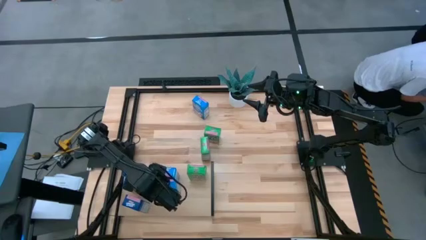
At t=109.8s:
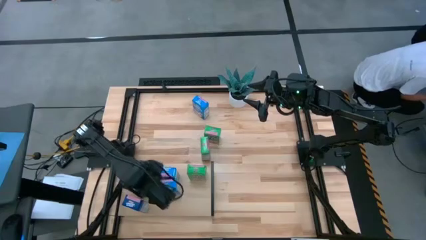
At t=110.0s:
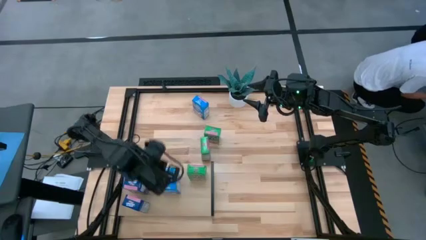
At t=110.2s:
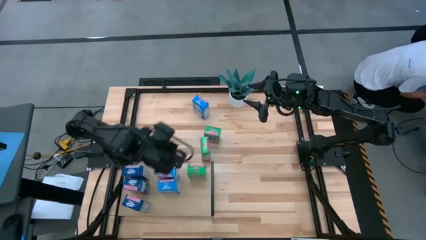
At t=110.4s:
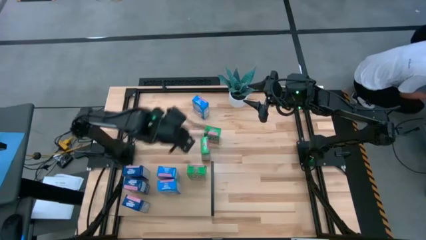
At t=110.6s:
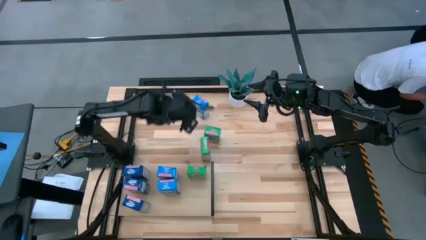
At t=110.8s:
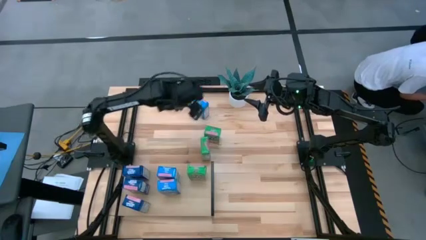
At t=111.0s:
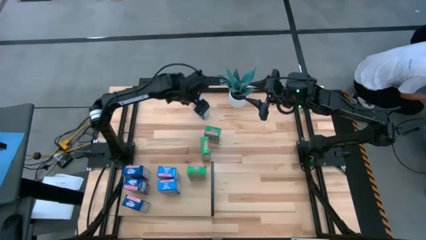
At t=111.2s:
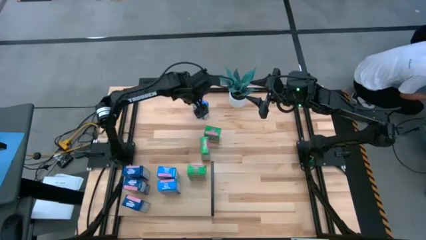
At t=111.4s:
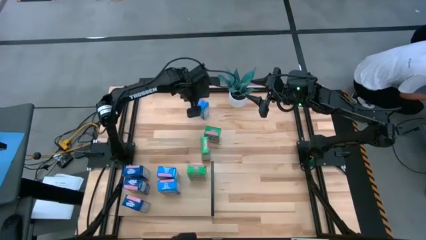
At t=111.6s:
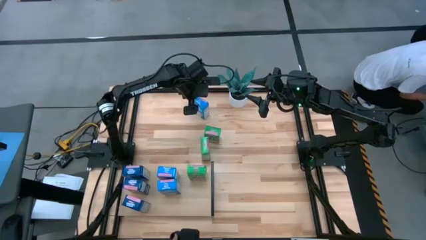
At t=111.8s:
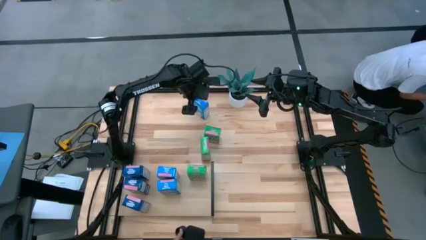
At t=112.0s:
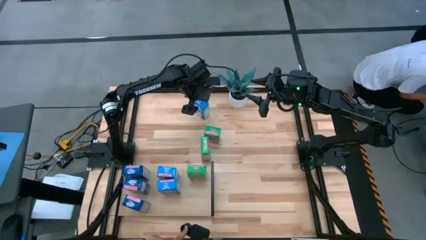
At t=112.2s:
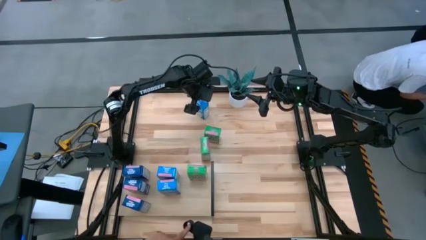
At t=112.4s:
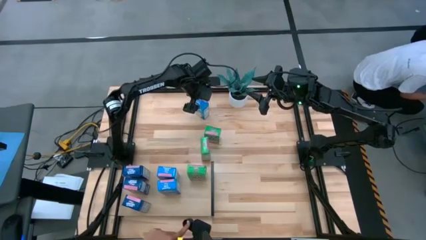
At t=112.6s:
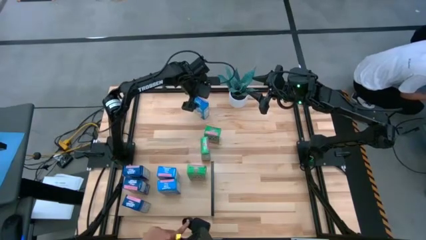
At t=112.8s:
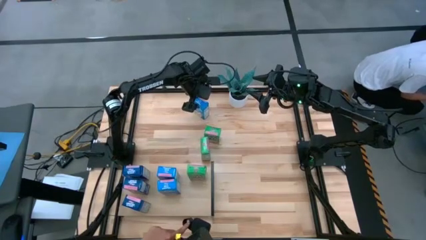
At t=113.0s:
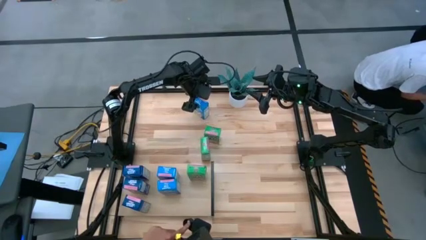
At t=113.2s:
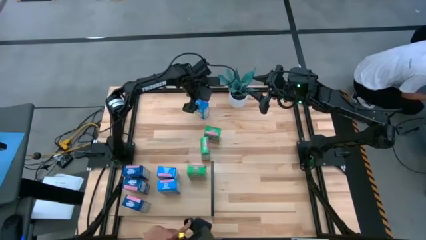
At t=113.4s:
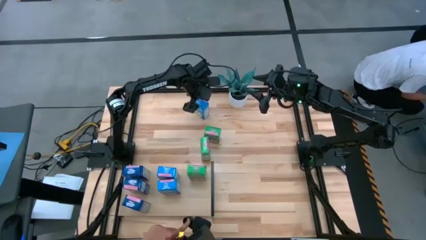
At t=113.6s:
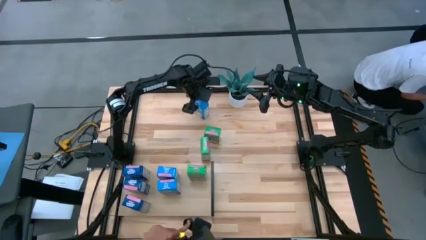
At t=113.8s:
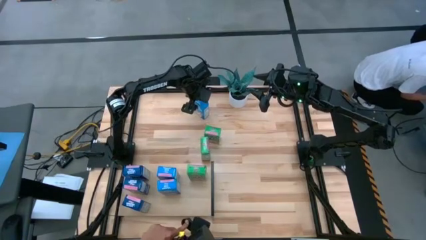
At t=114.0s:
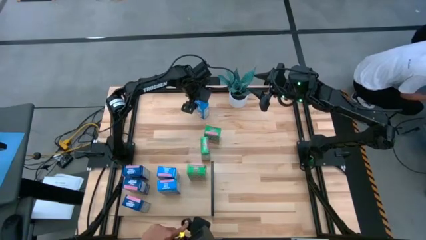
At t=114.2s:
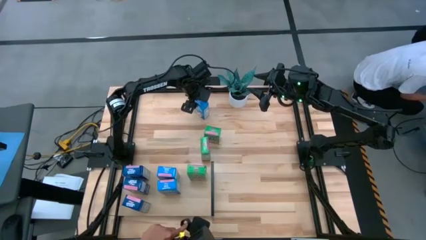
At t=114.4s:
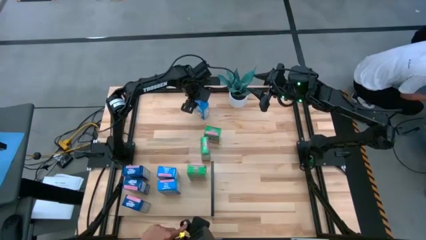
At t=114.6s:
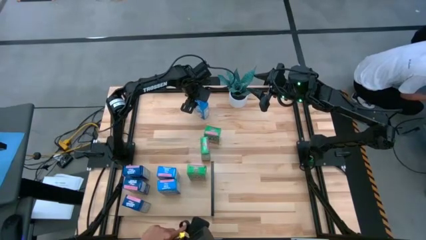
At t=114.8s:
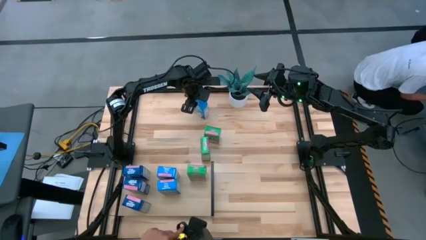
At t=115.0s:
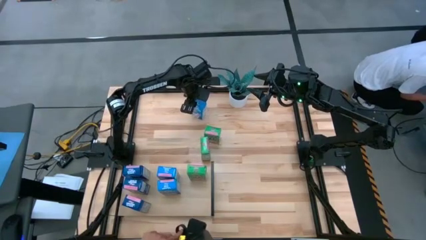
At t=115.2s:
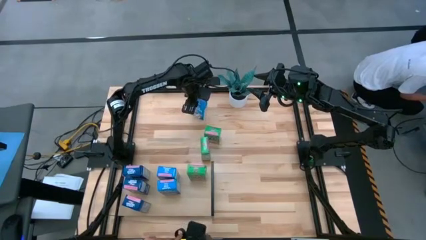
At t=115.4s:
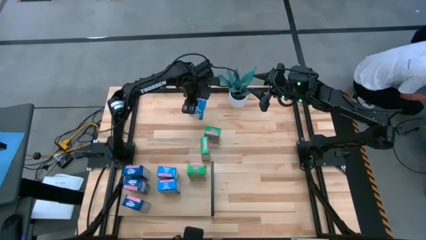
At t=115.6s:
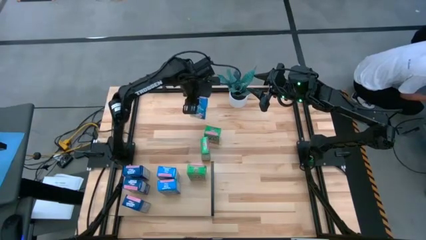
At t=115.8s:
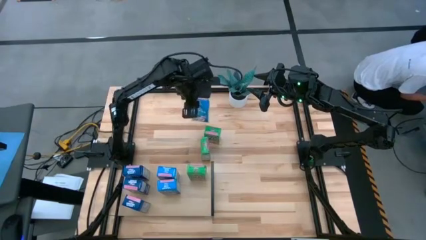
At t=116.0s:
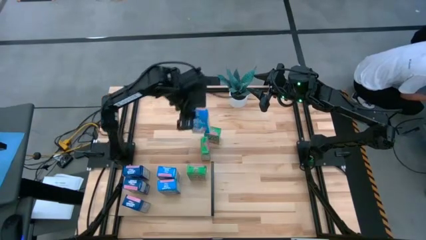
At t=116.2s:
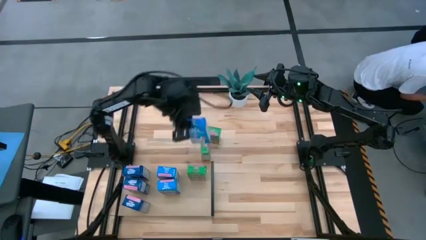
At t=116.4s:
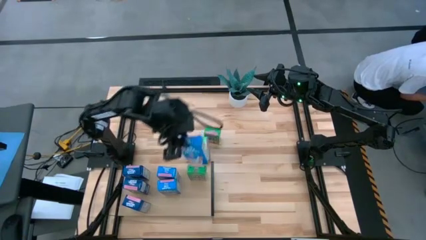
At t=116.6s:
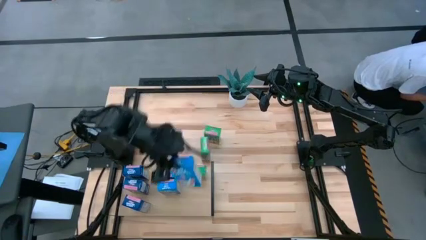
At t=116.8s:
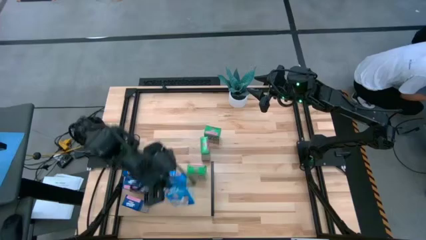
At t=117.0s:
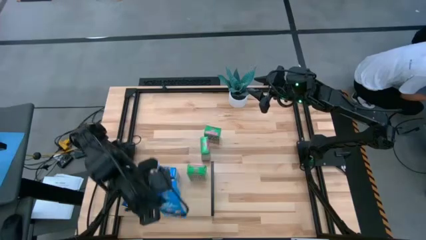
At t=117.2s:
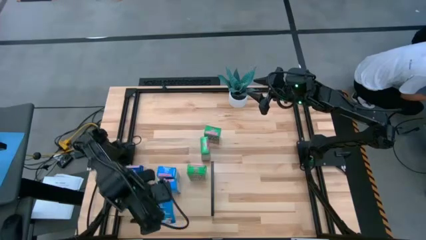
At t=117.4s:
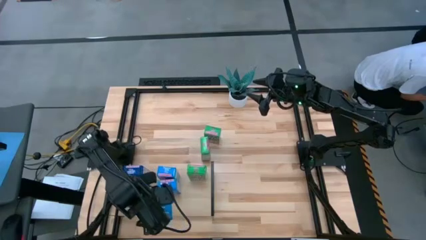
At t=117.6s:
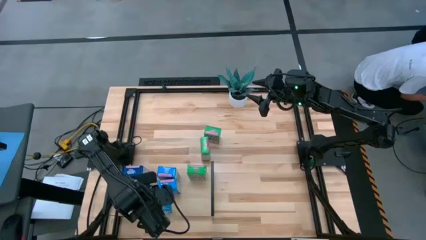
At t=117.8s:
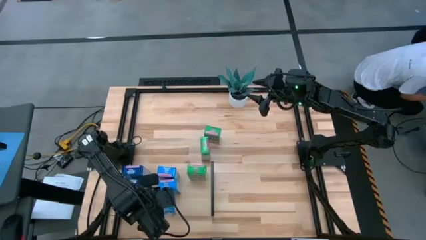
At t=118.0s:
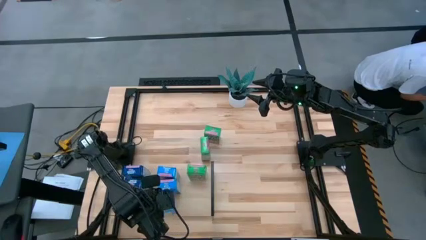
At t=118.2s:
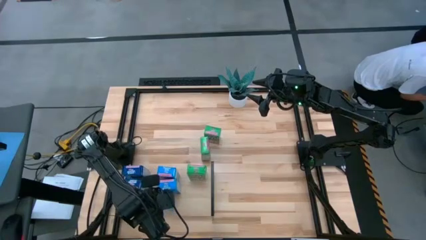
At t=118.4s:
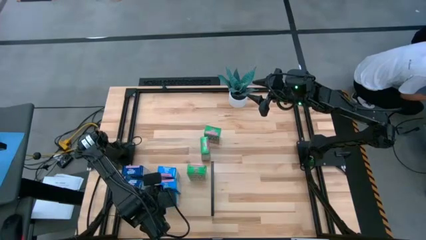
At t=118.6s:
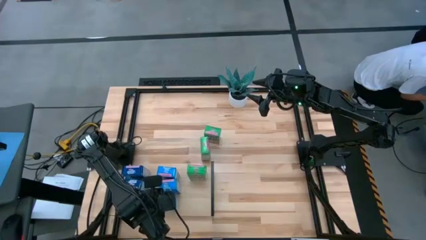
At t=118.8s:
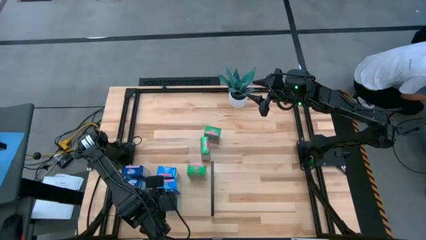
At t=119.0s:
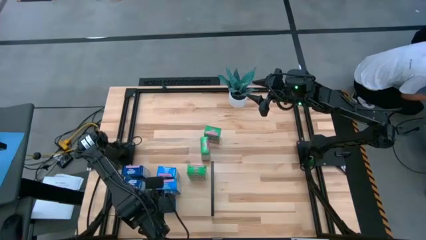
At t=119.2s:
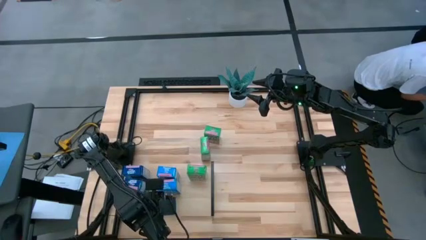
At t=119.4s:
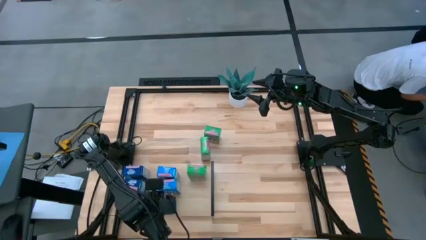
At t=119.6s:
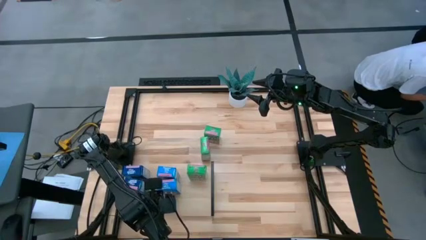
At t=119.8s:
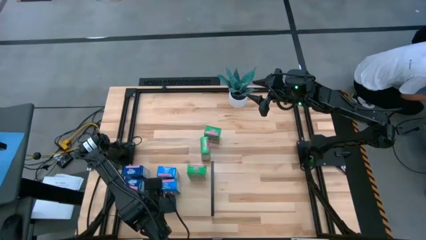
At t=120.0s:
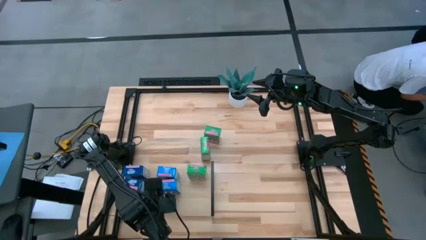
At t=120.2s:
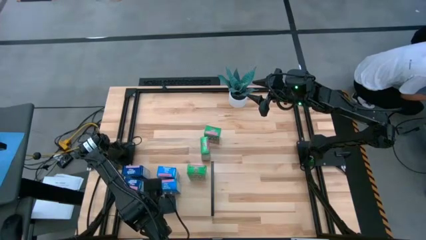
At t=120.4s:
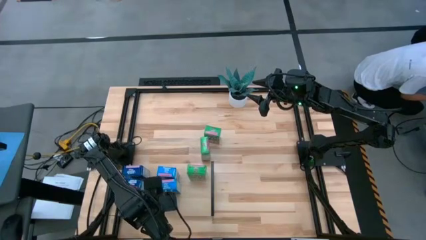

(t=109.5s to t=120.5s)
Task: Stack cereal on shelf
Put the light blue cereal box on the shelf aligned with the other light blue cereal boxes

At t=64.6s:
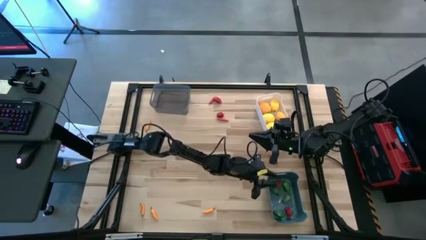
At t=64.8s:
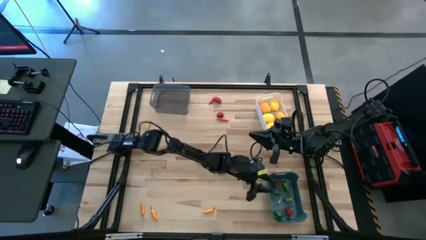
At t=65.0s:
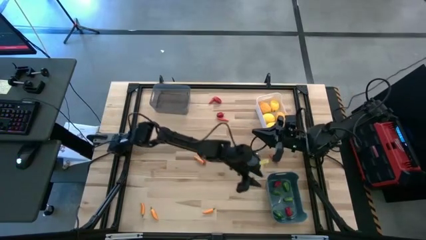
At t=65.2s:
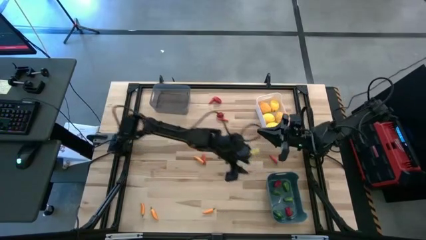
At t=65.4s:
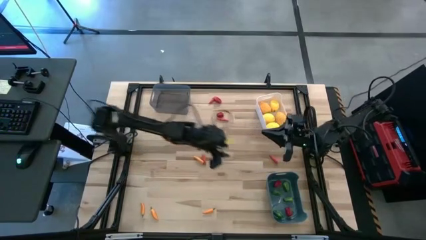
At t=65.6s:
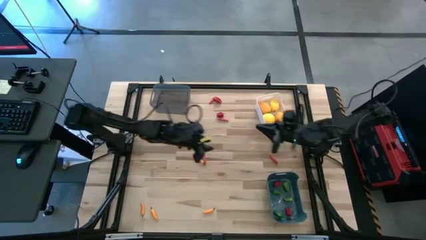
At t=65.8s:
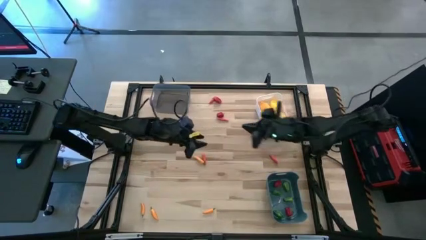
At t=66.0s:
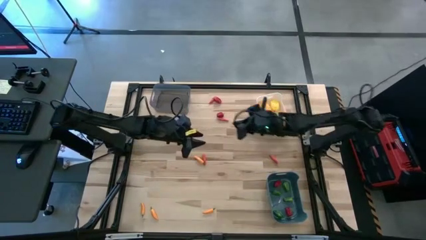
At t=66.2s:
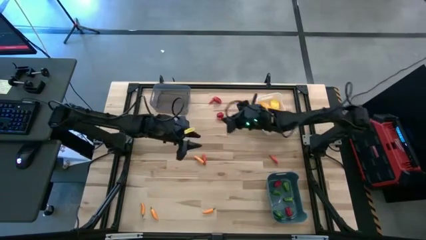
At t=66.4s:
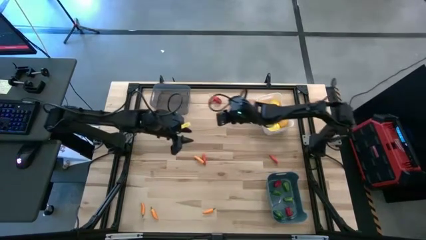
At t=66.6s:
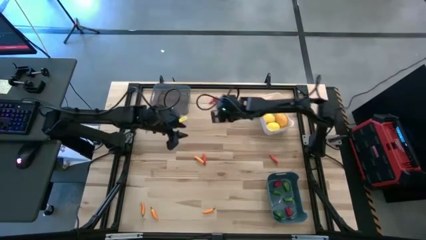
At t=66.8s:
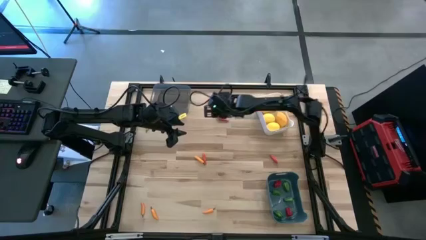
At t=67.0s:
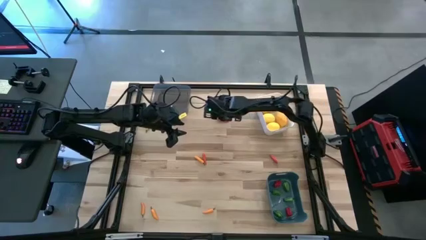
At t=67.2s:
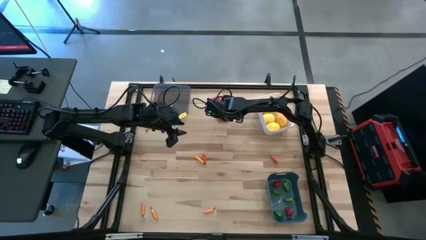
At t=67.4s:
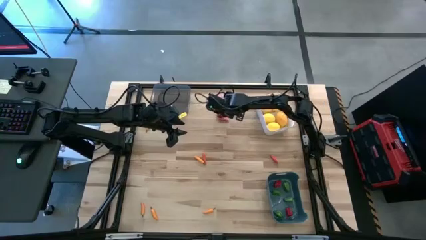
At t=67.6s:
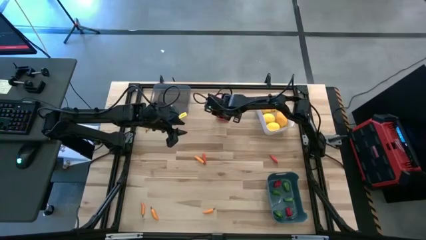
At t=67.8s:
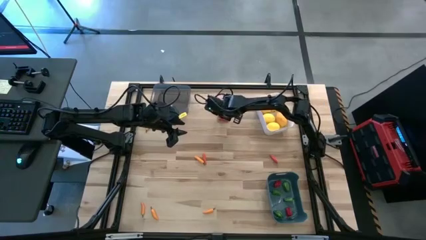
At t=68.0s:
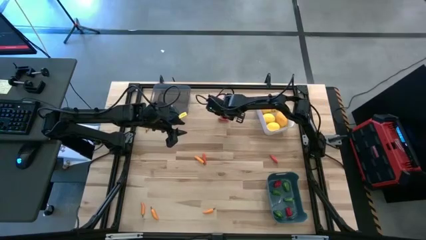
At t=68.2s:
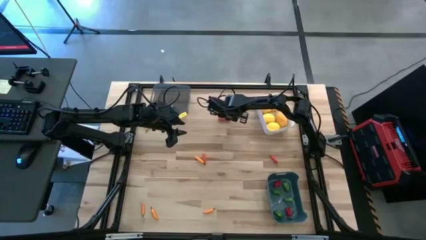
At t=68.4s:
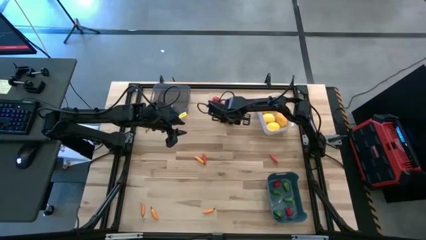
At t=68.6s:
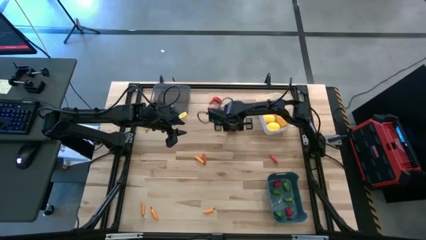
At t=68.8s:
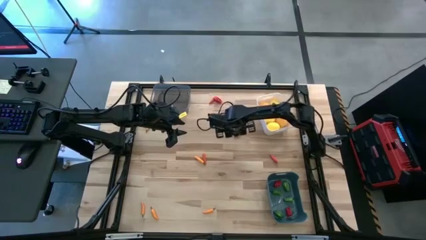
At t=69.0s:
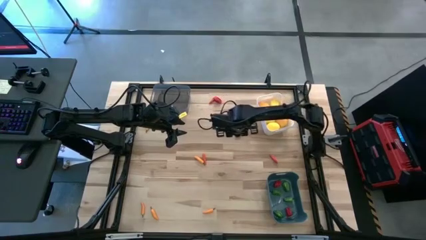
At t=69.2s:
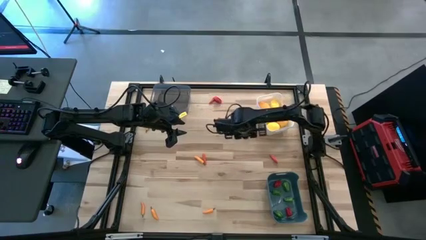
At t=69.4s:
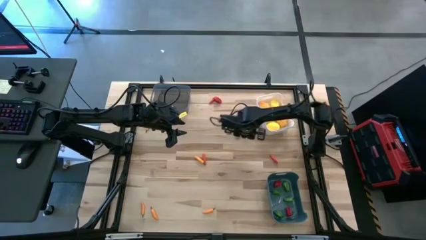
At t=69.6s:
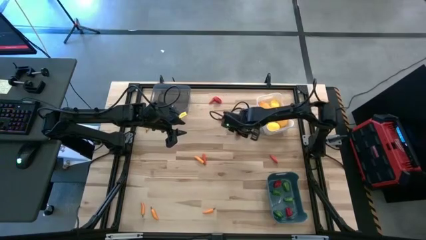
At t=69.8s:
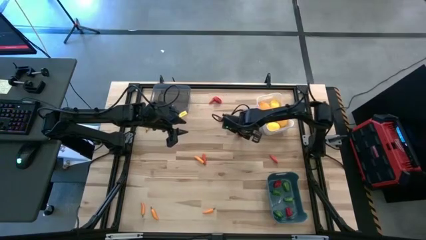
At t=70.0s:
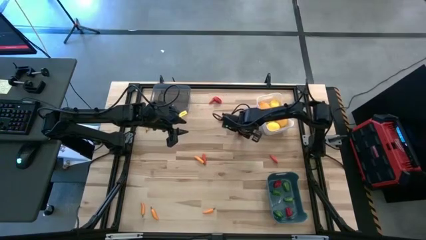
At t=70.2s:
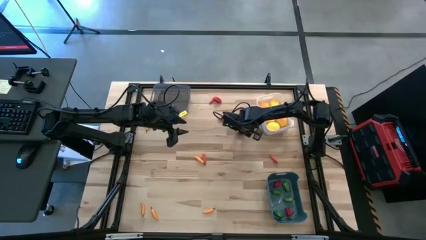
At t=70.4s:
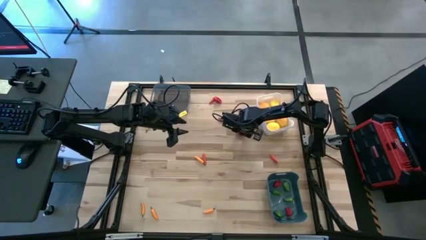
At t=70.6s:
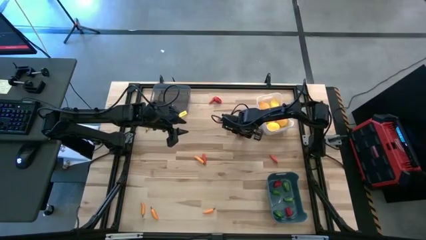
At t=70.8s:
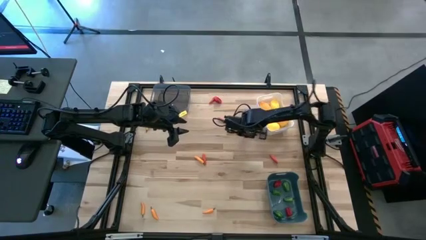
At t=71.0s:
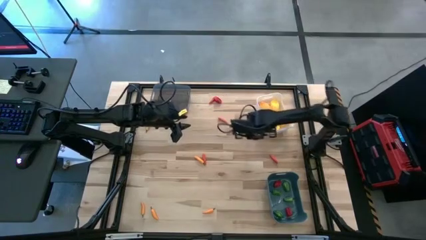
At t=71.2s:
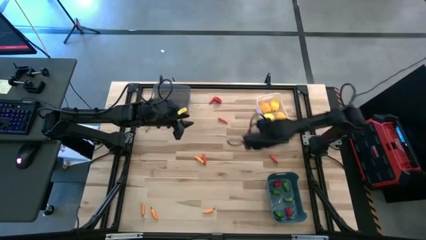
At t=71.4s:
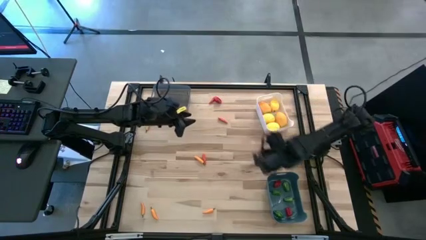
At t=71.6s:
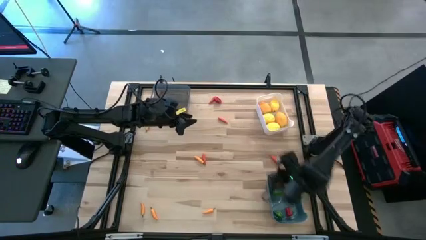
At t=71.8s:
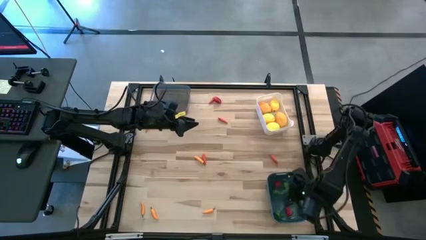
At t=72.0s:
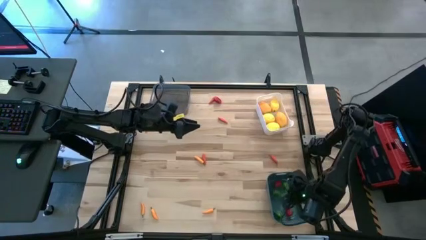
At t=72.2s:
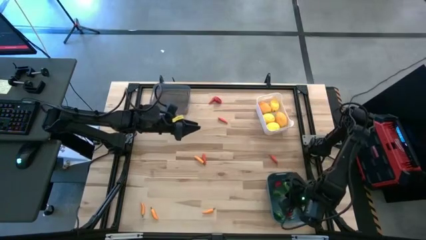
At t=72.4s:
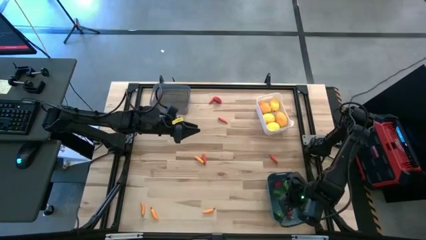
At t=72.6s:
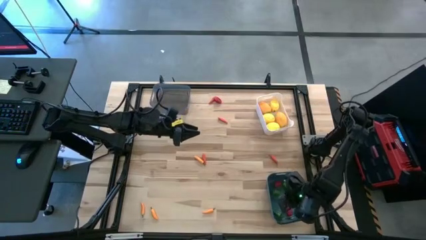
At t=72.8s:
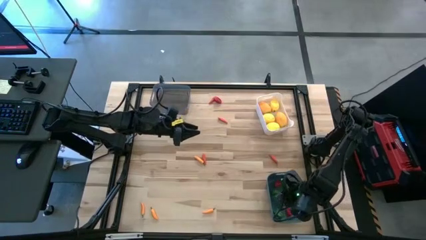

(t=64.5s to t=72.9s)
Task: Sort produce into baskets
Put the red chili pepper into the blue bin
